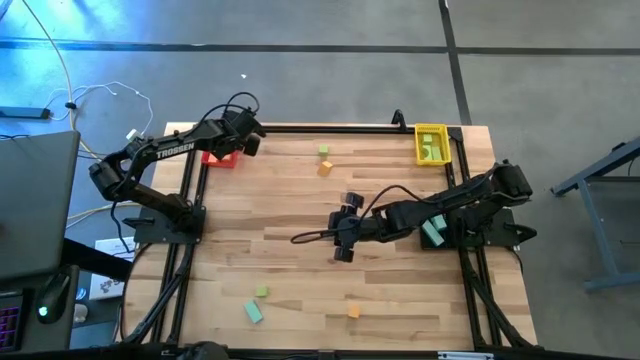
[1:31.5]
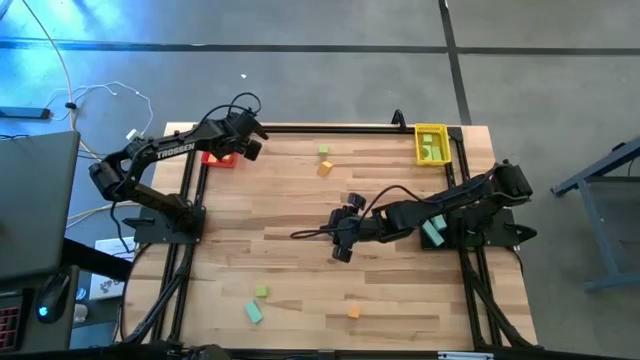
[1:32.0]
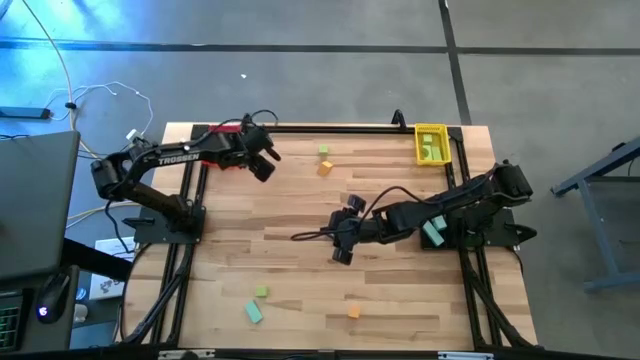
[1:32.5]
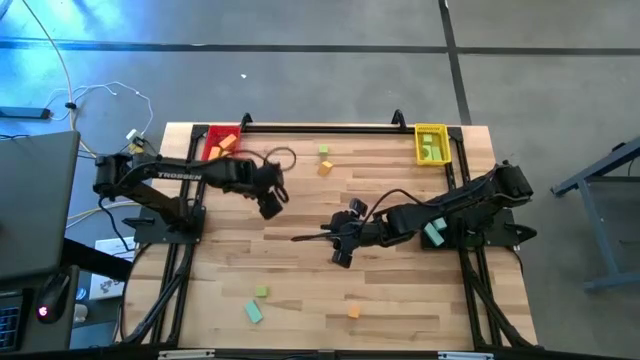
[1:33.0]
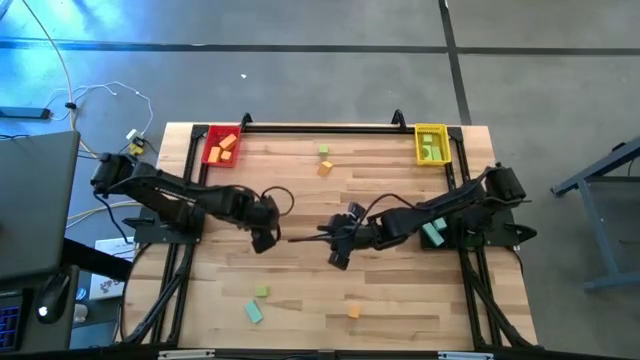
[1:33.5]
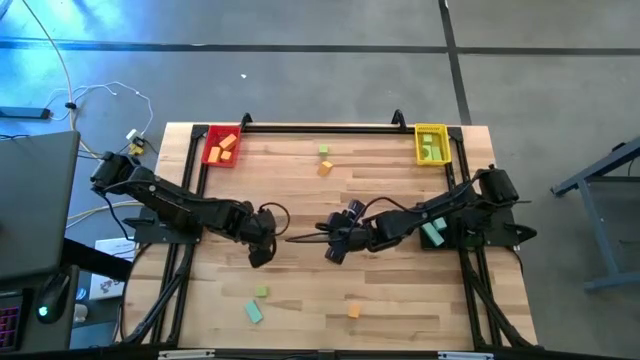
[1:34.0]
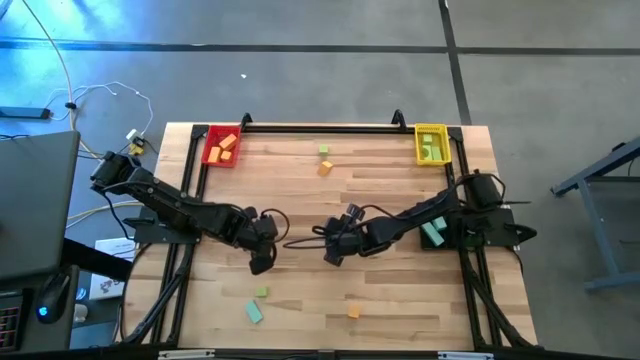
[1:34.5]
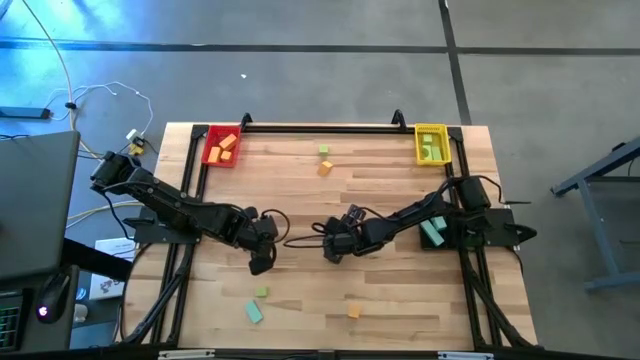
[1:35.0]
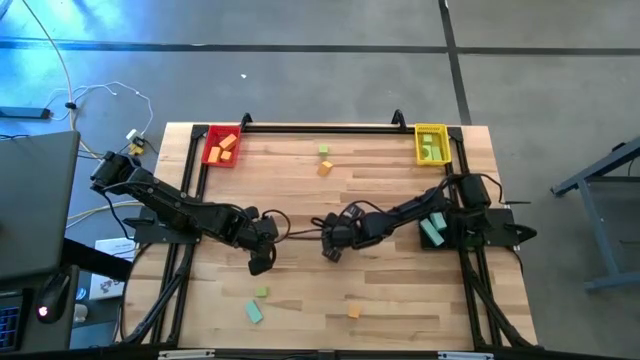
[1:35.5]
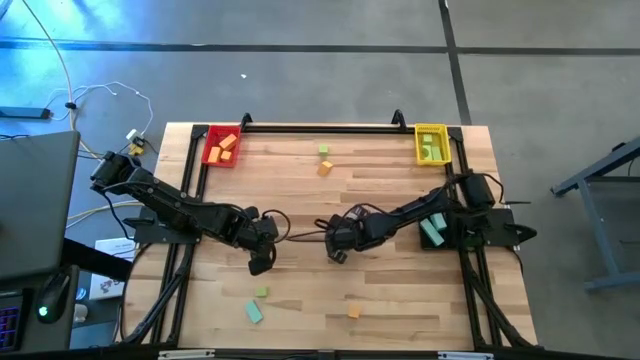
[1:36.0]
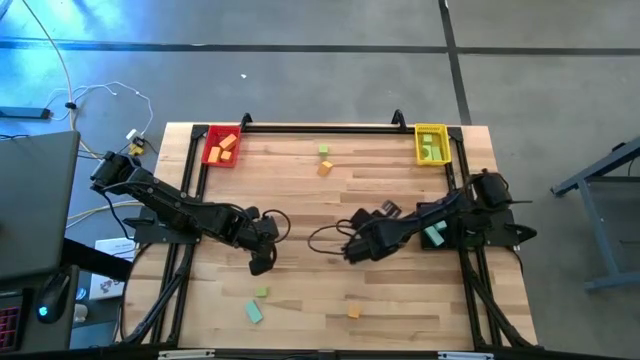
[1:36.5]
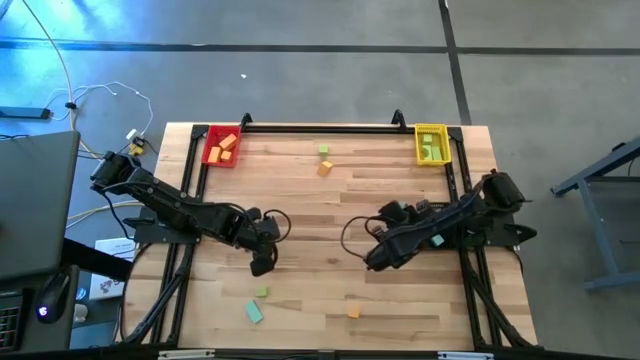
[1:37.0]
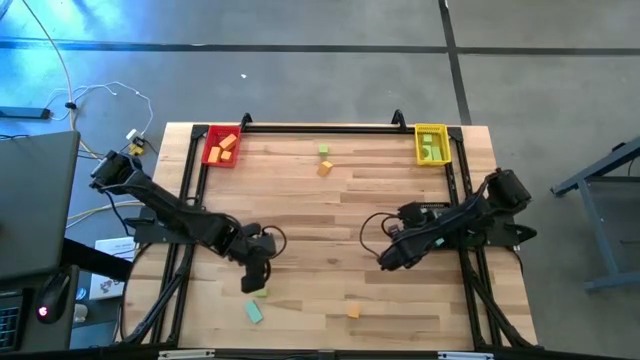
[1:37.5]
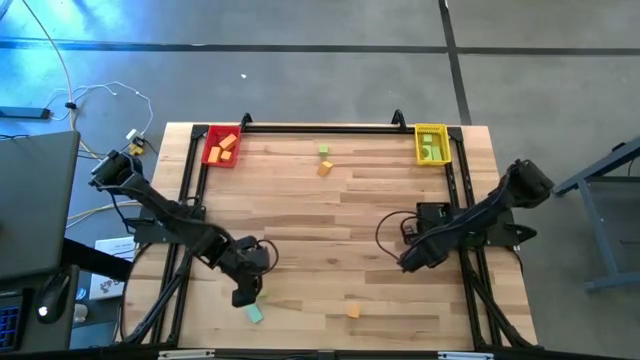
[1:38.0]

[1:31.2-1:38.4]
Task: Sort & place blocks by color
Put the blue block into the black bin

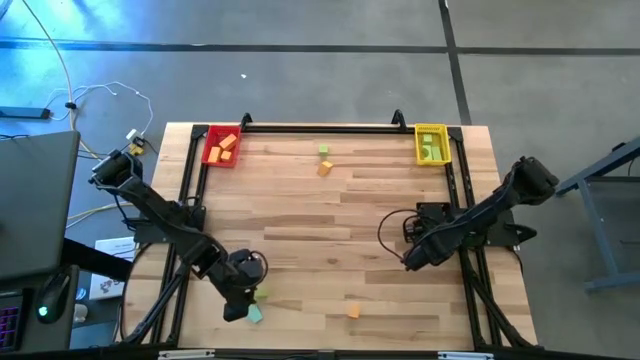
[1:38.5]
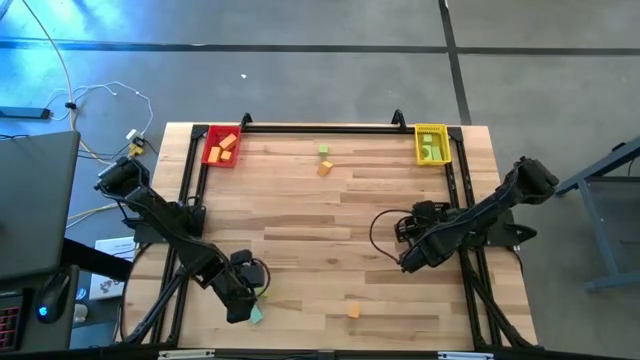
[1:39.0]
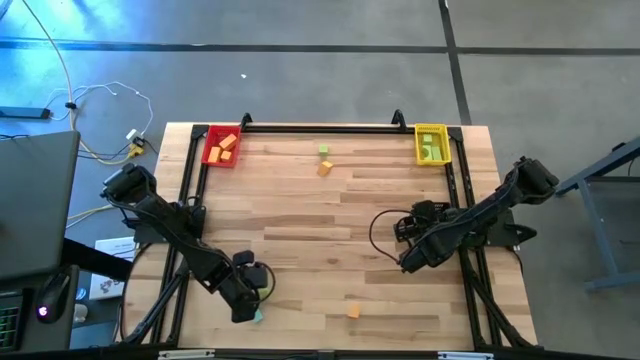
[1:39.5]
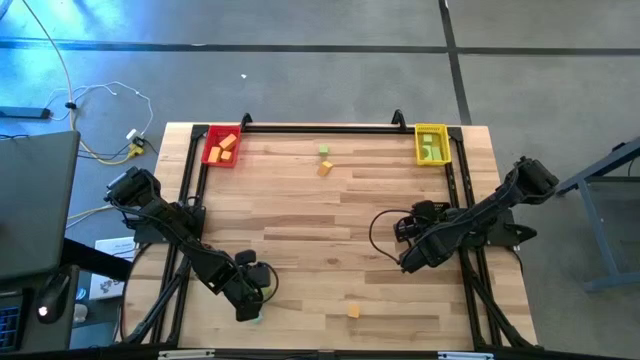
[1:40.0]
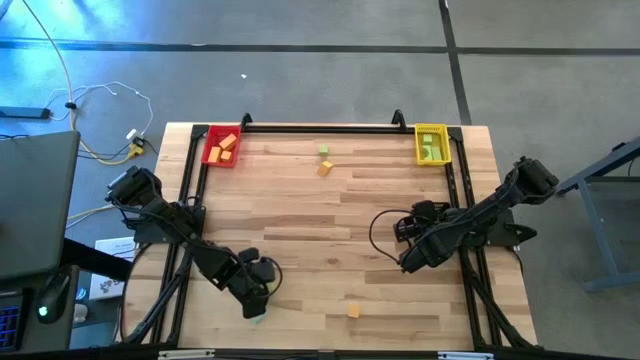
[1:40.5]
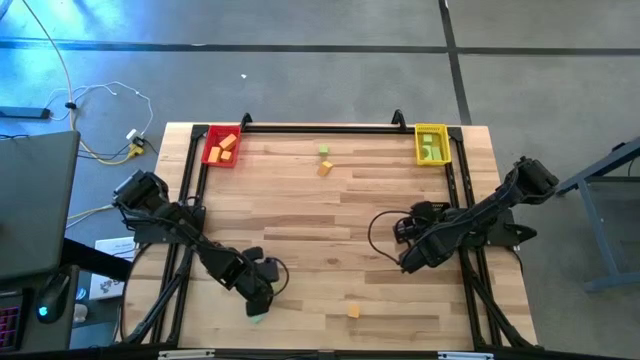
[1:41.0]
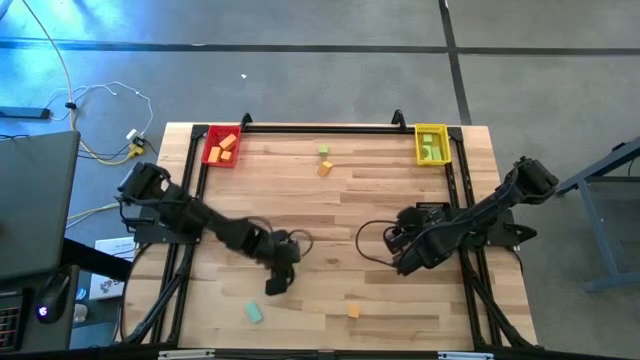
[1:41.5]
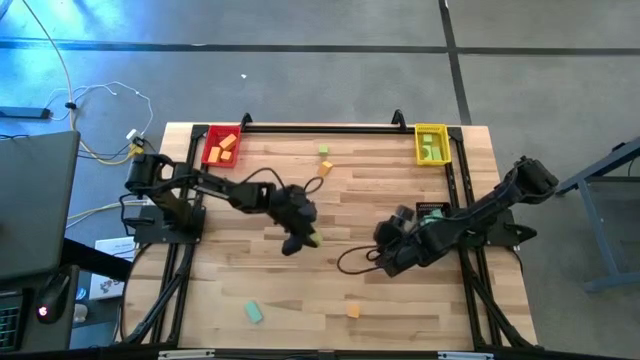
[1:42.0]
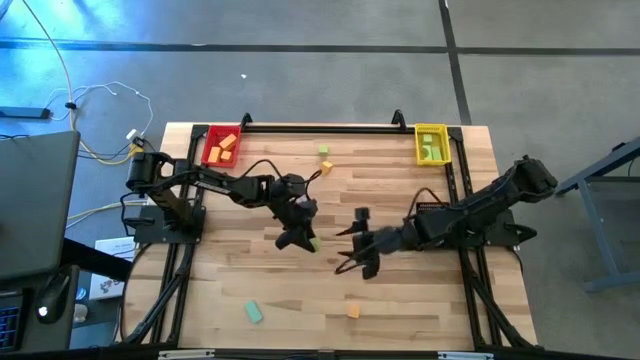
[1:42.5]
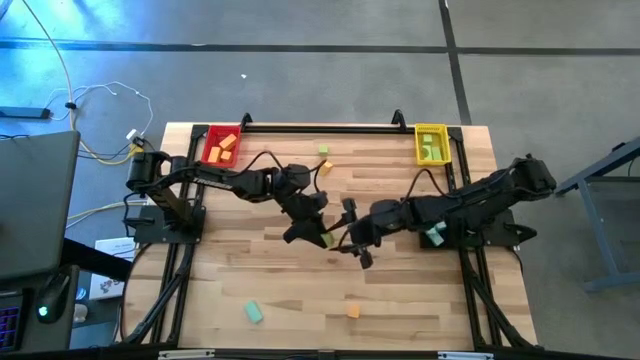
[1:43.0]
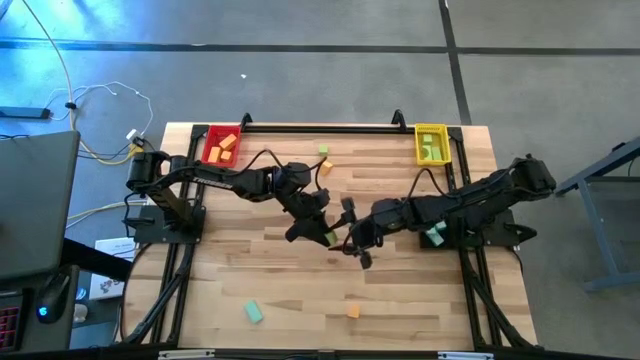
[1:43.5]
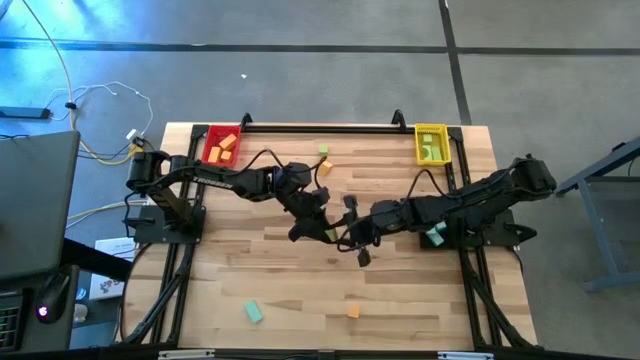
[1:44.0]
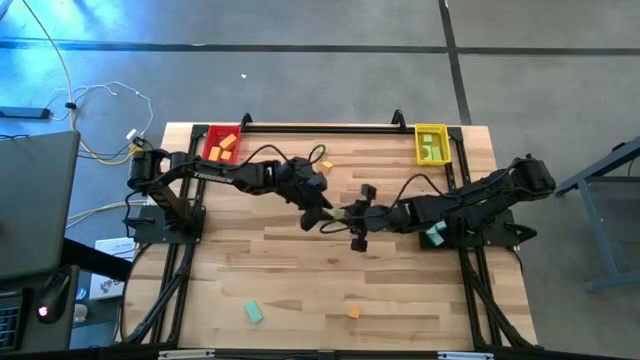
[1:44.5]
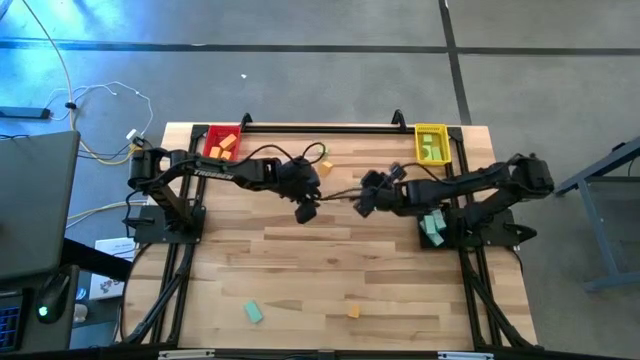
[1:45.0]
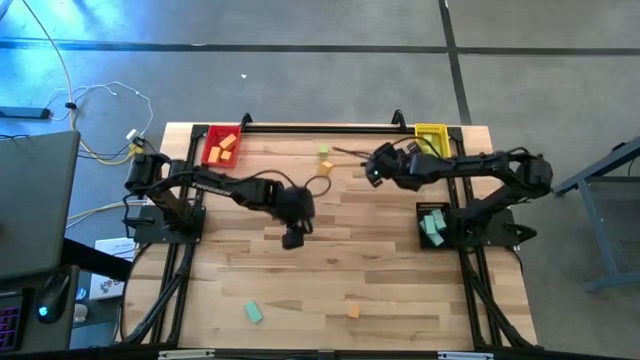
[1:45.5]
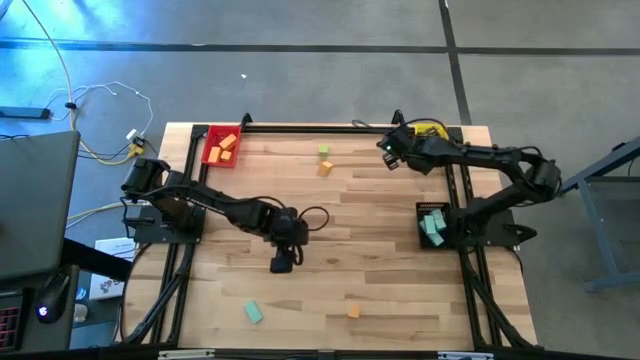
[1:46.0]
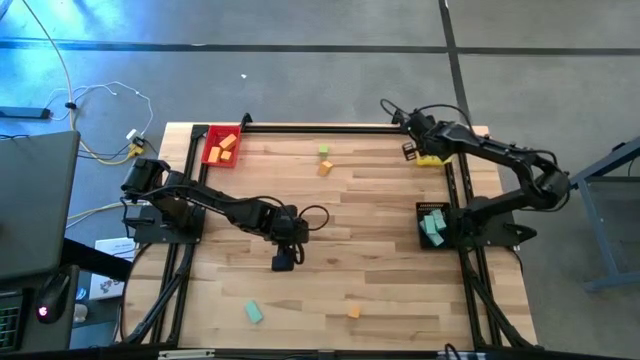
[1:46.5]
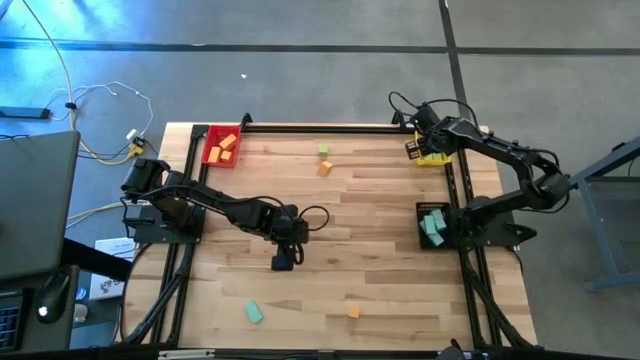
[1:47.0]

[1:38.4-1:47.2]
Put the green block into the yellow bin

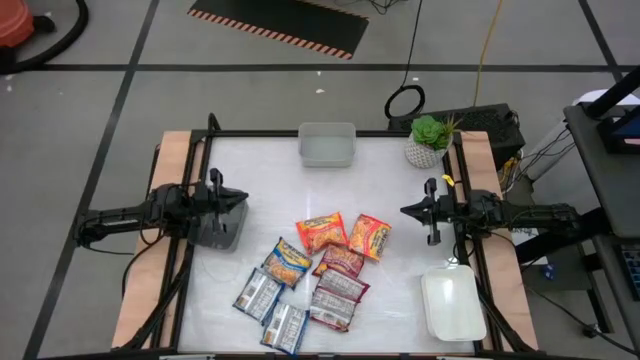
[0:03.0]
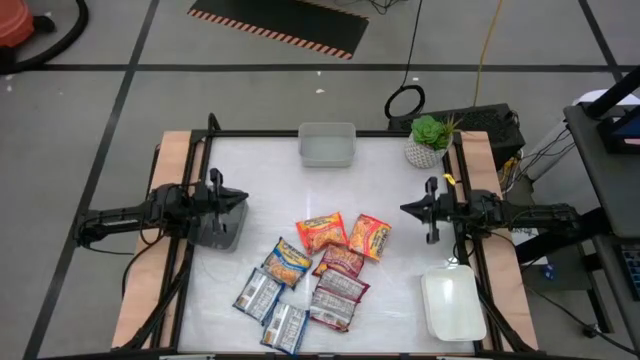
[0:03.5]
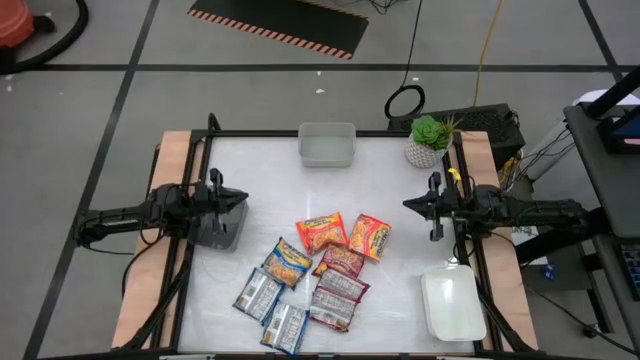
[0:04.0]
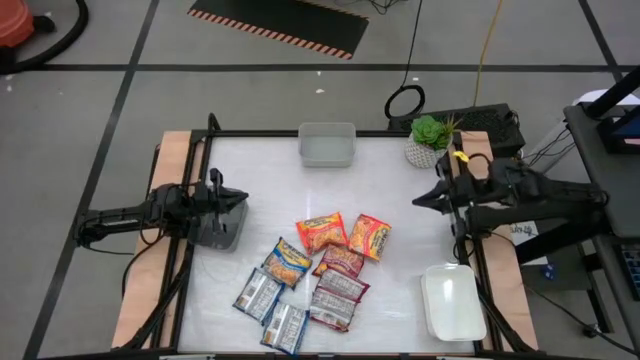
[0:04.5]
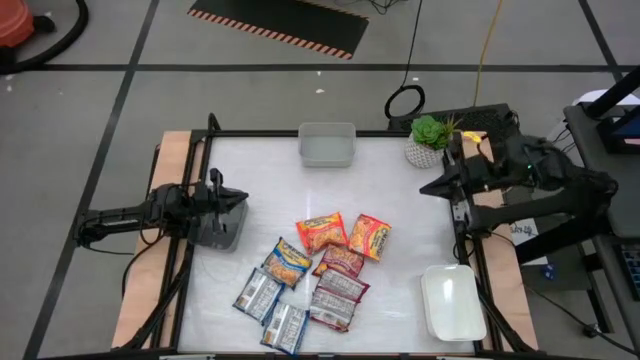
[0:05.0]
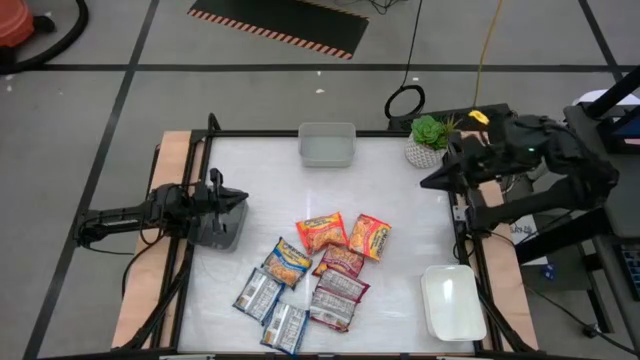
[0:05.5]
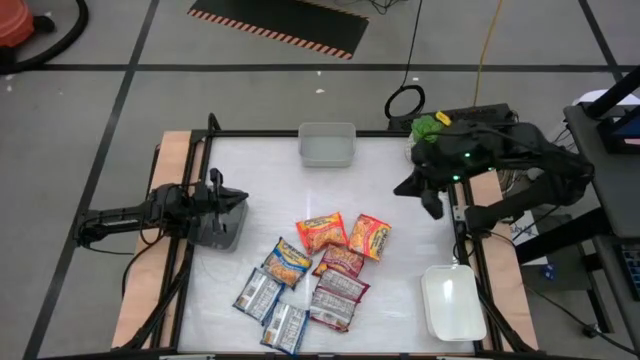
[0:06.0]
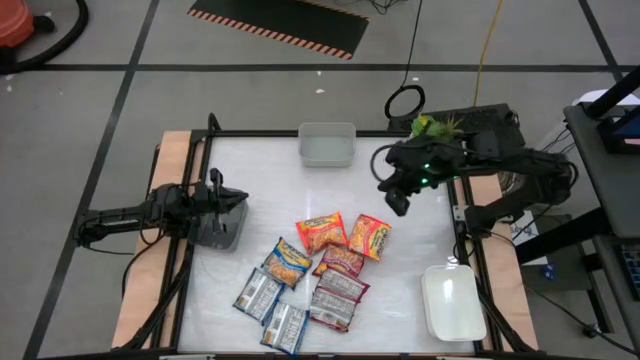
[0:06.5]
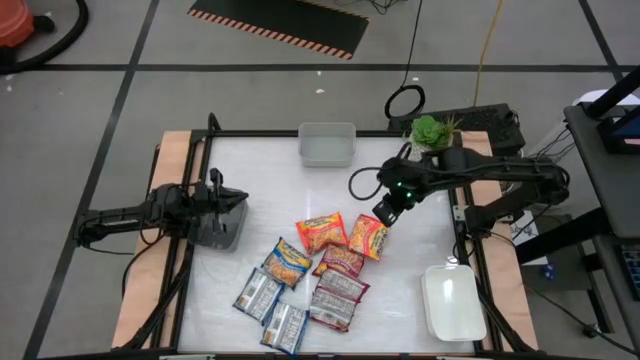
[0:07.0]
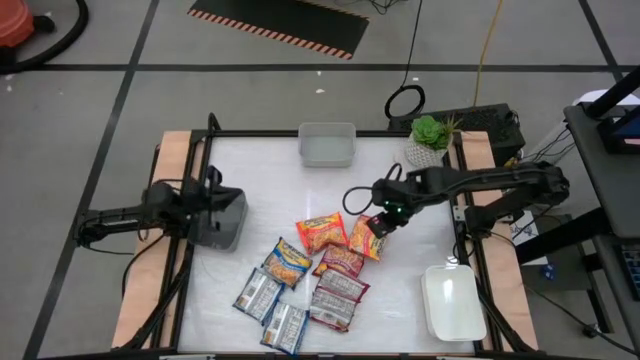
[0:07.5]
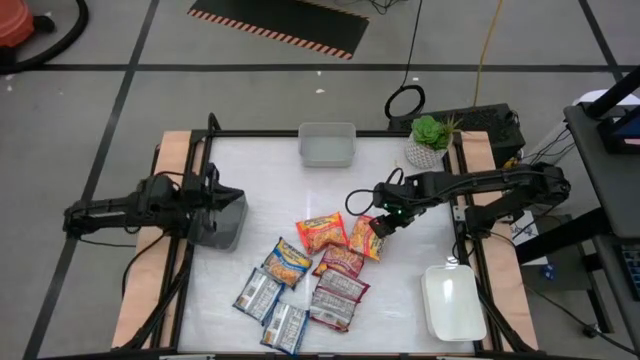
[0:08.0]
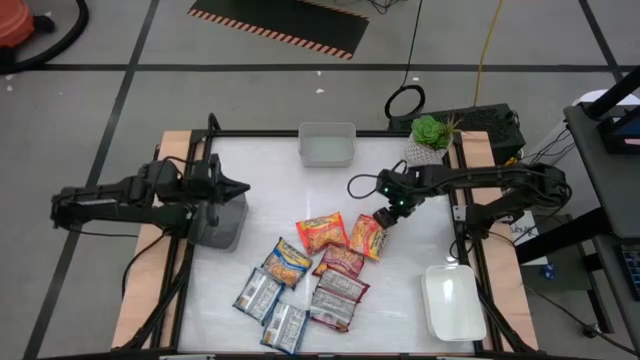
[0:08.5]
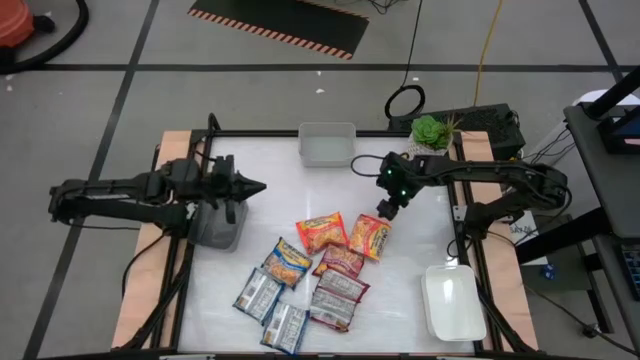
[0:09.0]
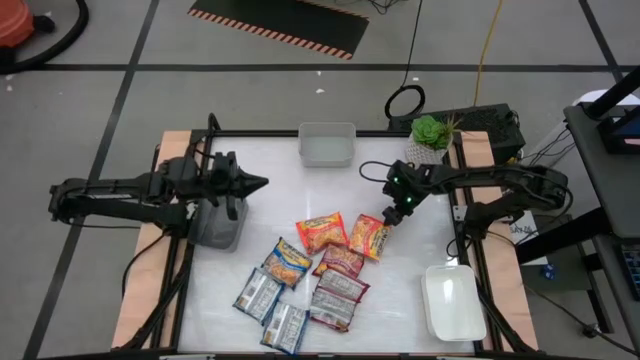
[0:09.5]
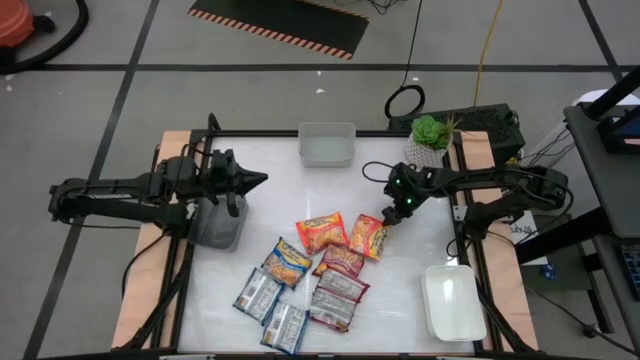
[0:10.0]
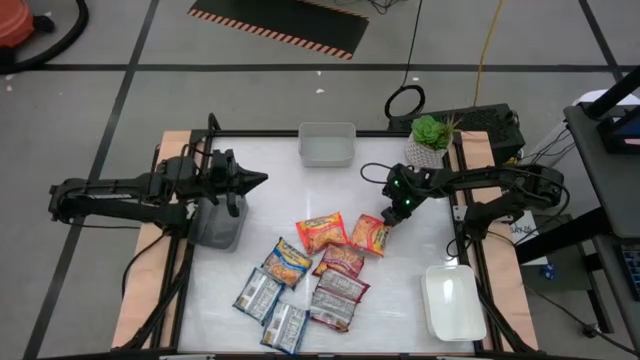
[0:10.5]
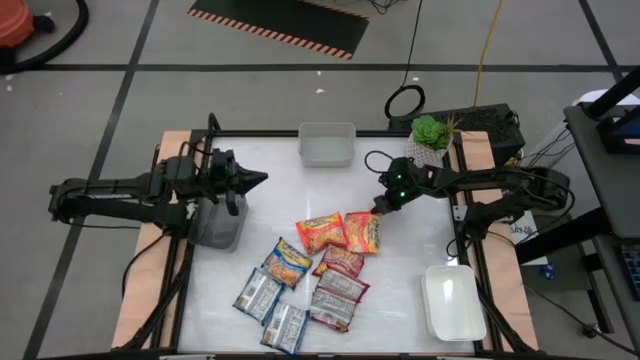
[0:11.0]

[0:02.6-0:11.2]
Task: Sort Maruchan noodles
Put the right orange noodle pack into the gray bin
